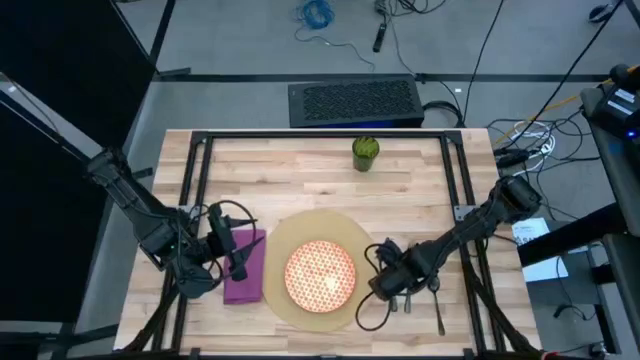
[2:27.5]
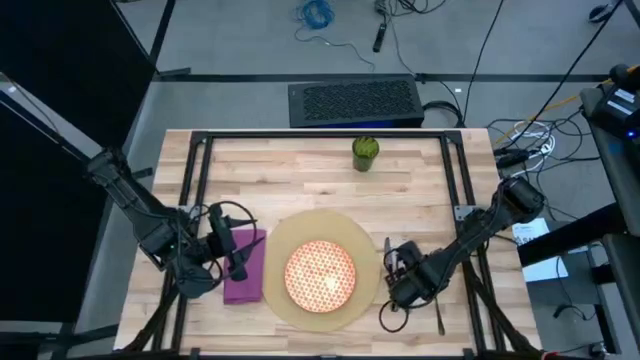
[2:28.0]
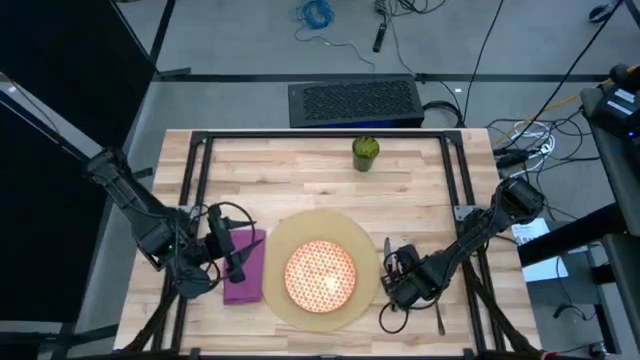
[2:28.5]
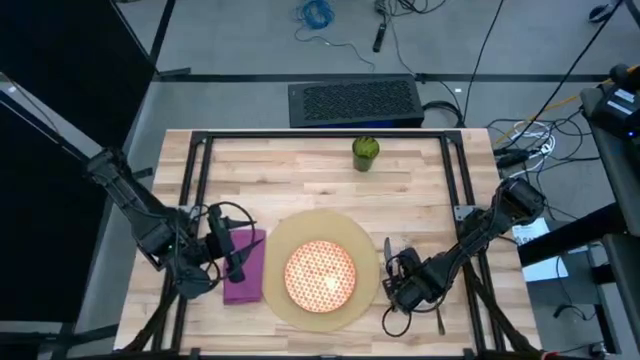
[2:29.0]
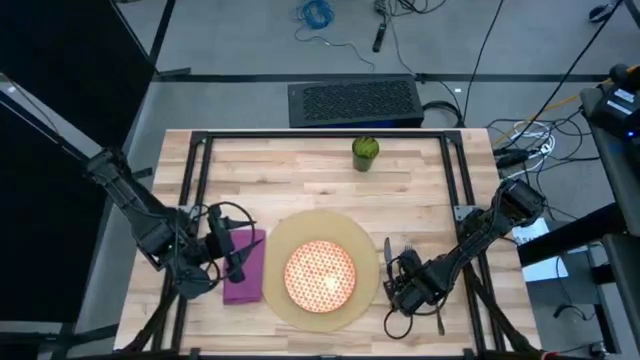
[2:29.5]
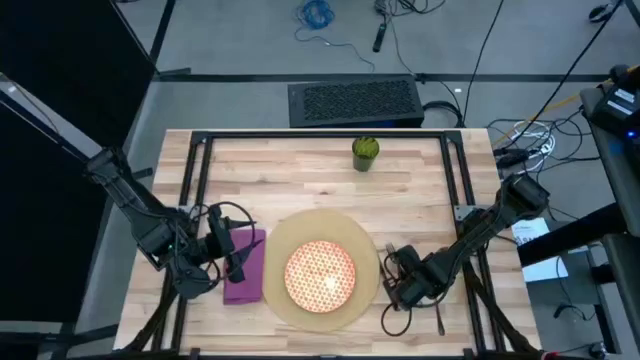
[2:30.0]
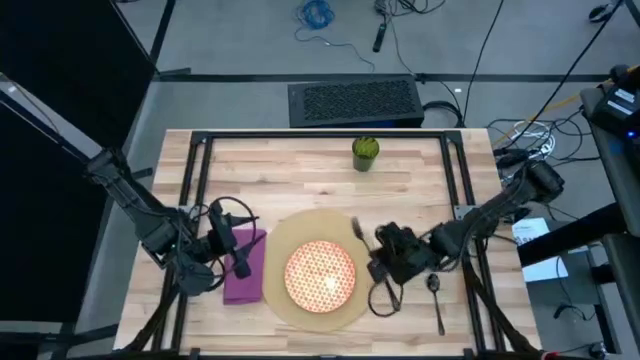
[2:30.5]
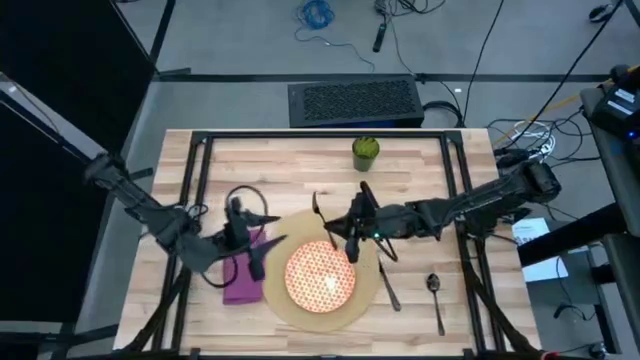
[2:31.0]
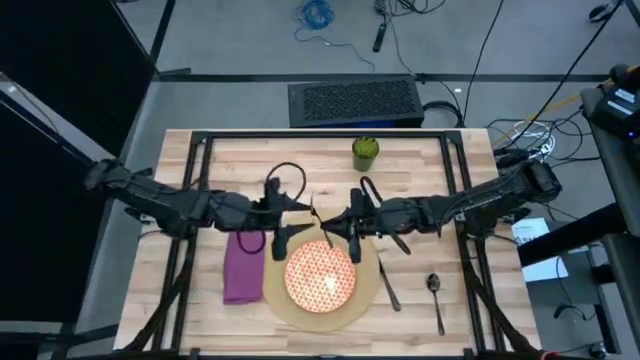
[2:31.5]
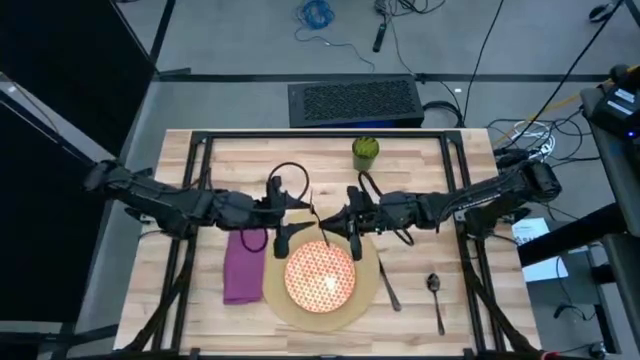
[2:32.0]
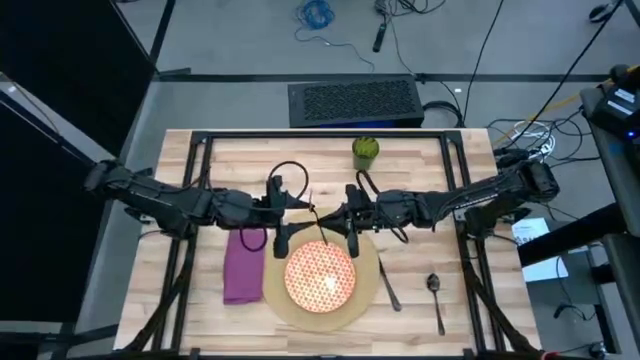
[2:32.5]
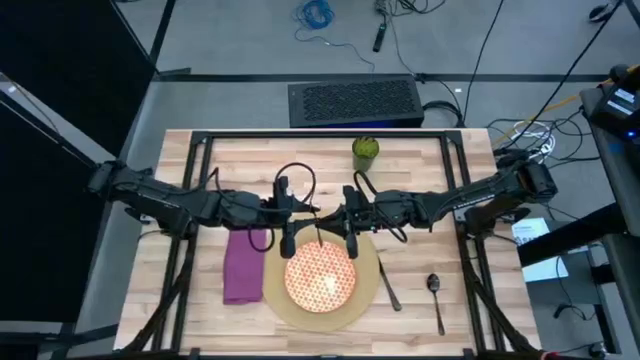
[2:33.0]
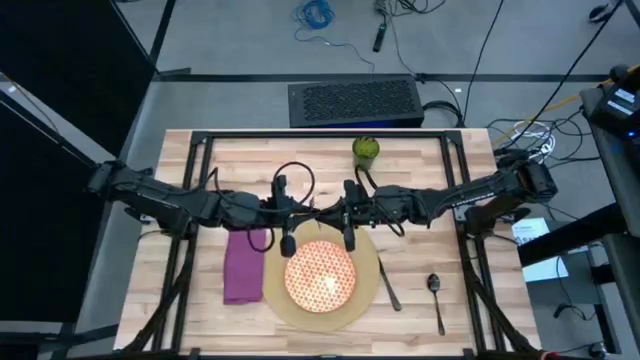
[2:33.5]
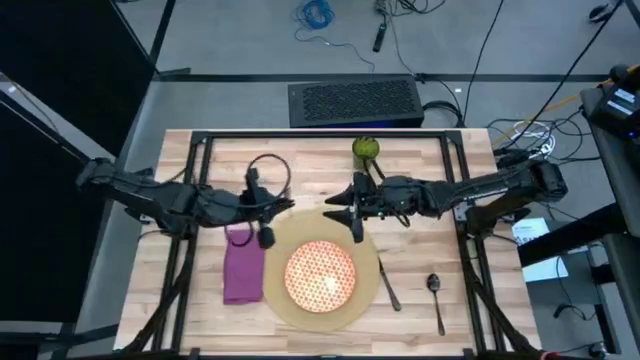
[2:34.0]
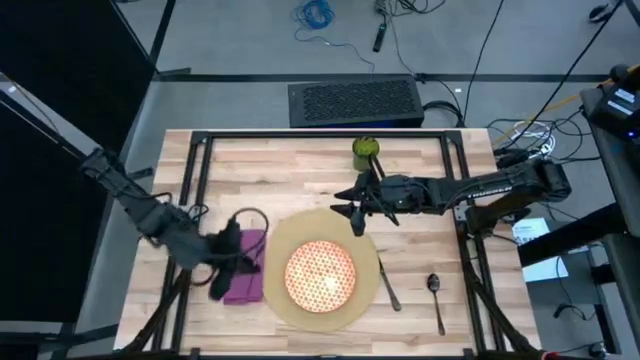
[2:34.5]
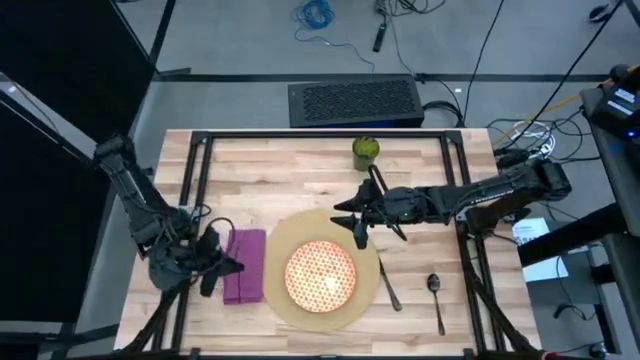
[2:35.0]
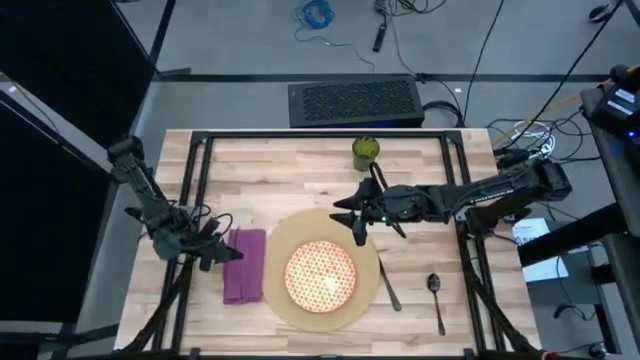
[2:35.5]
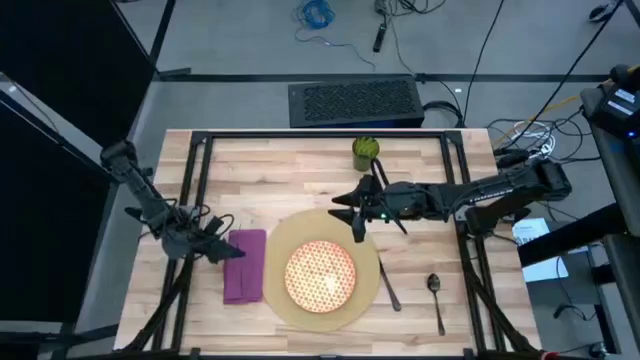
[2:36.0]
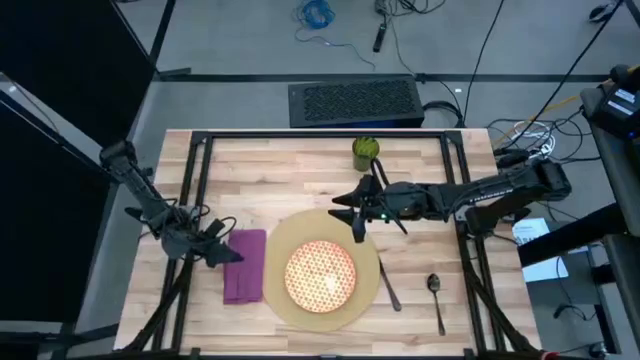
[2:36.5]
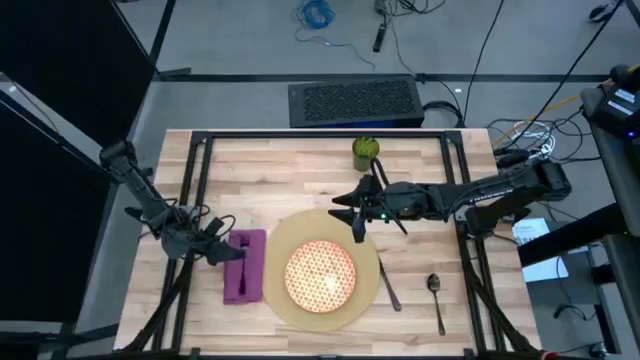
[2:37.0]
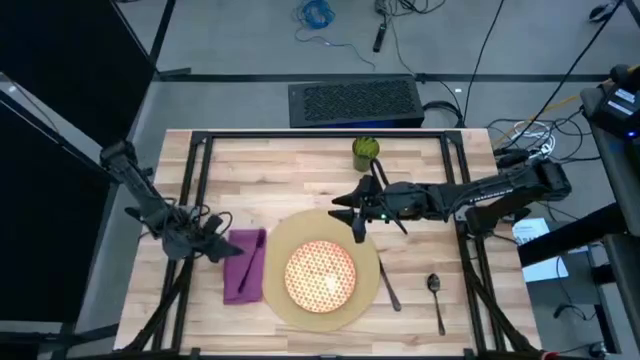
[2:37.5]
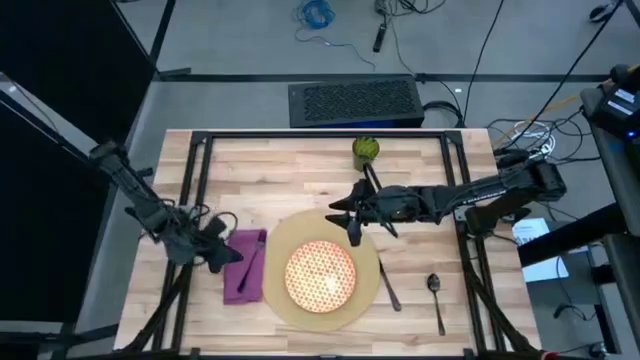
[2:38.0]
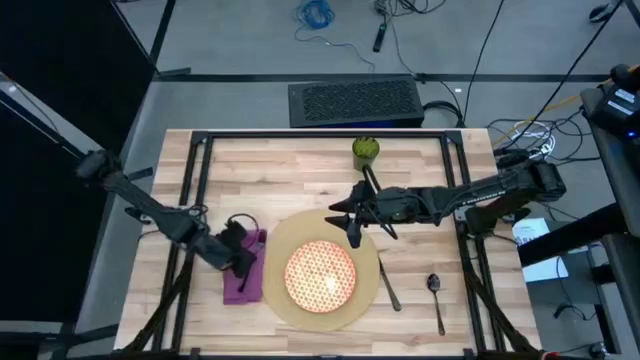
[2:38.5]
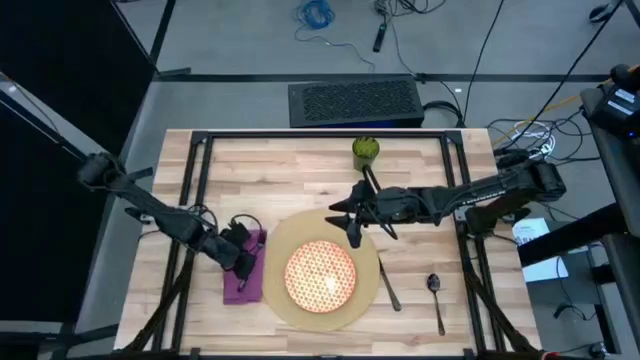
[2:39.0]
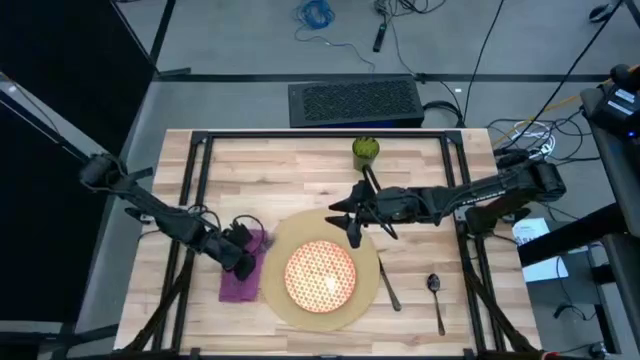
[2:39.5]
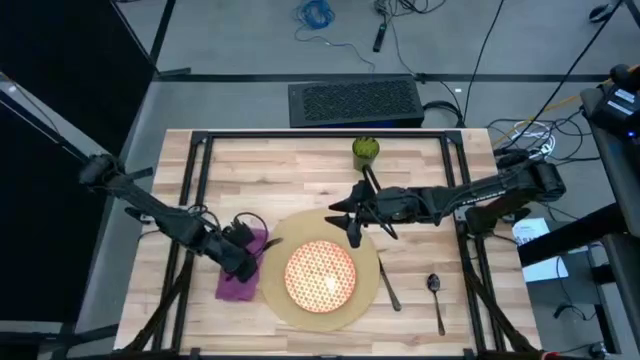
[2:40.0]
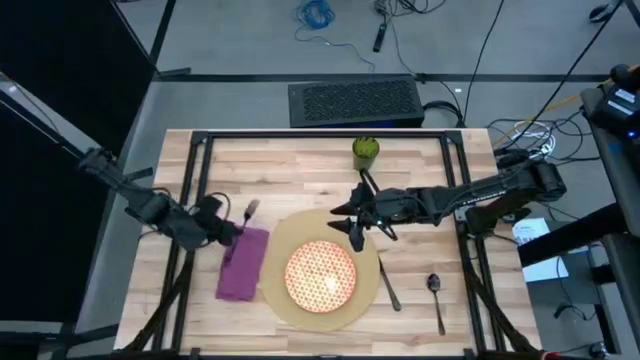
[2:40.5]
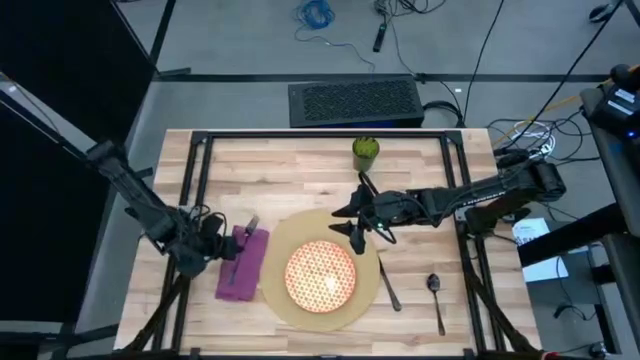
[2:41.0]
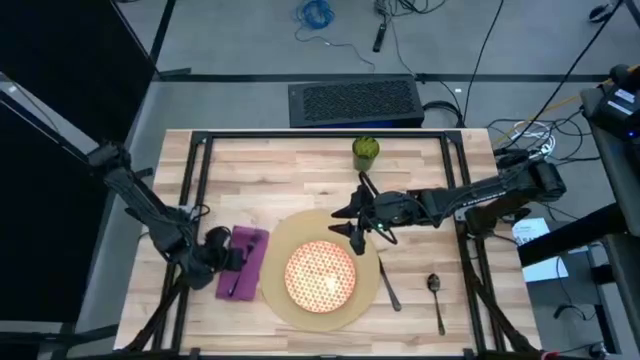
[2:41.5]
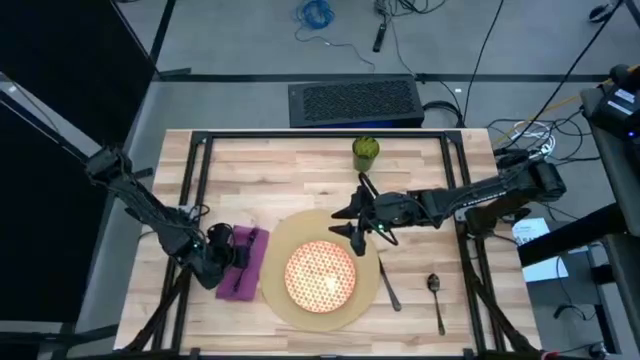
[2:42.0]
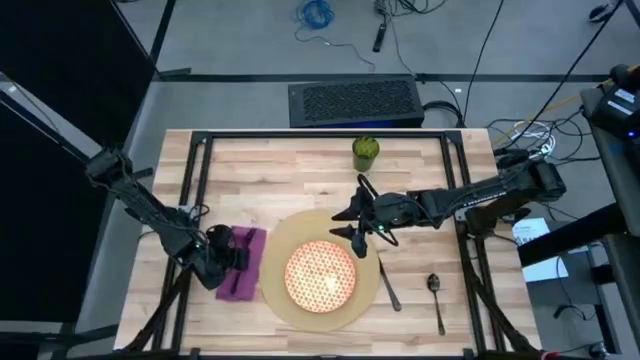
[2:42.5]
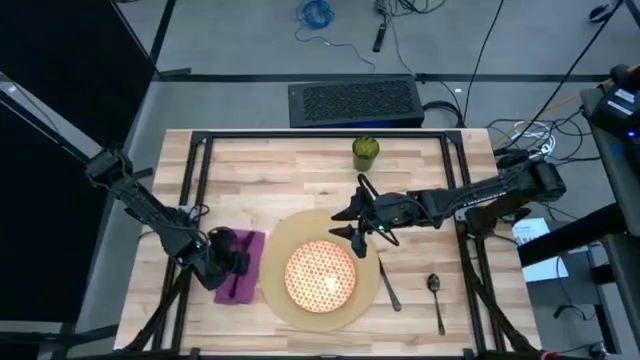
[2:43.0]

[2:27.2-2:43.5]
Task: Set table place
Put the black fork on top of the purple table napkin

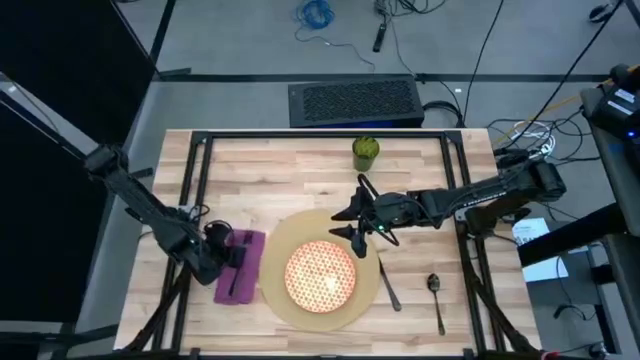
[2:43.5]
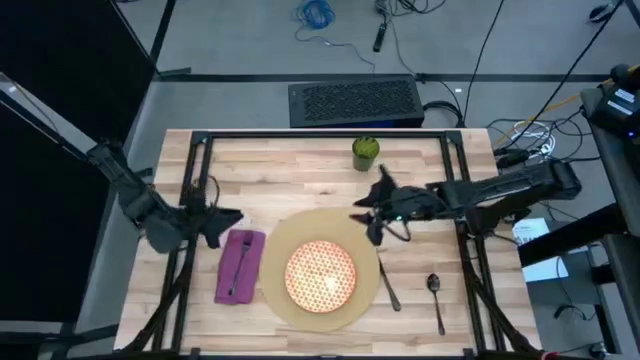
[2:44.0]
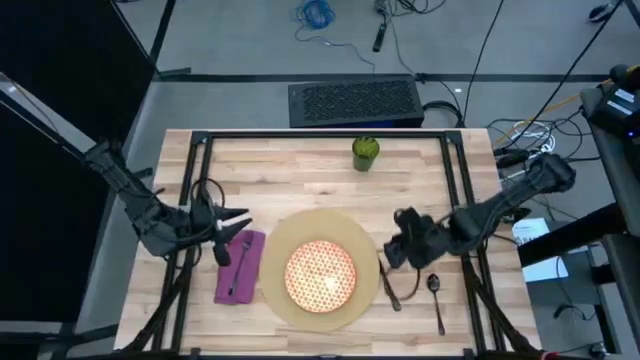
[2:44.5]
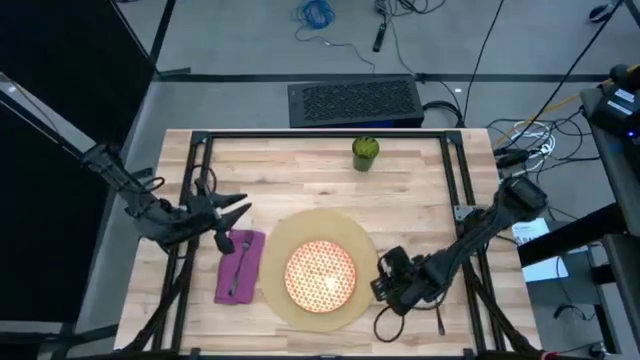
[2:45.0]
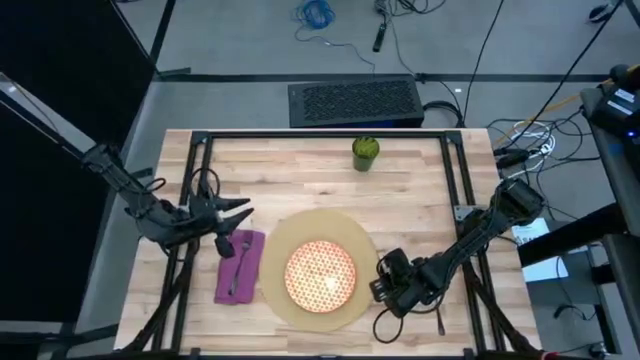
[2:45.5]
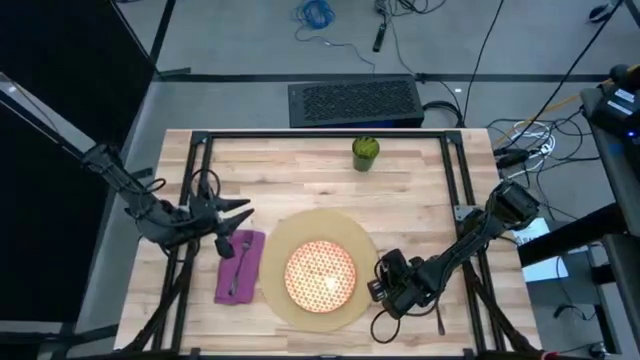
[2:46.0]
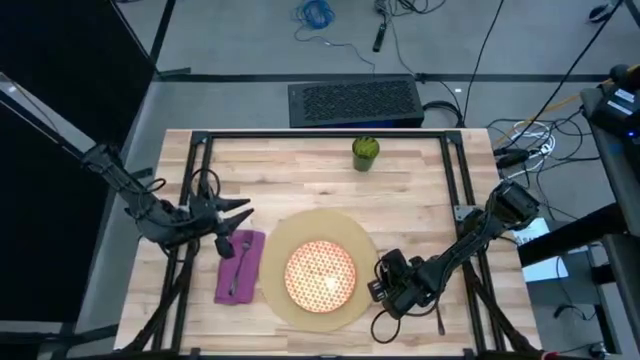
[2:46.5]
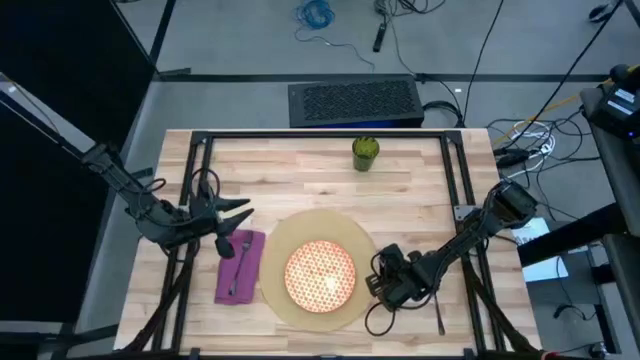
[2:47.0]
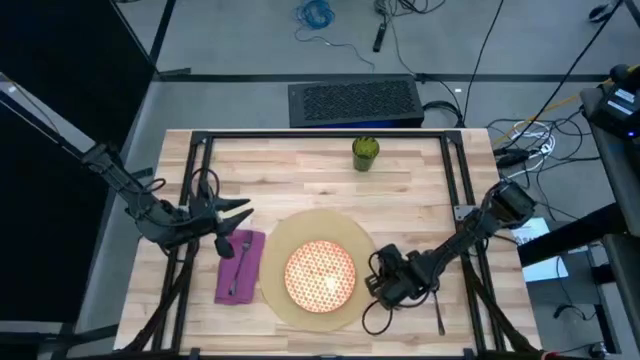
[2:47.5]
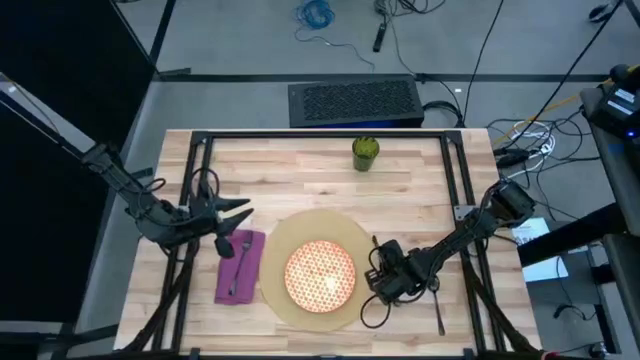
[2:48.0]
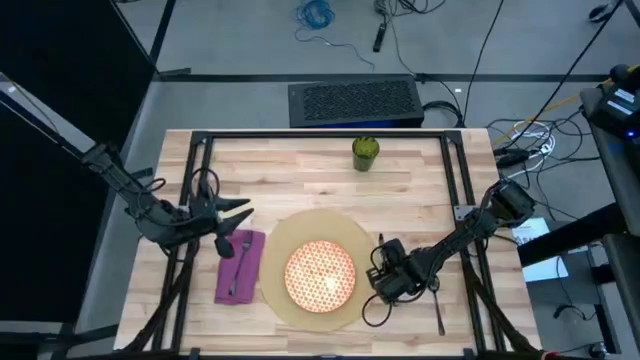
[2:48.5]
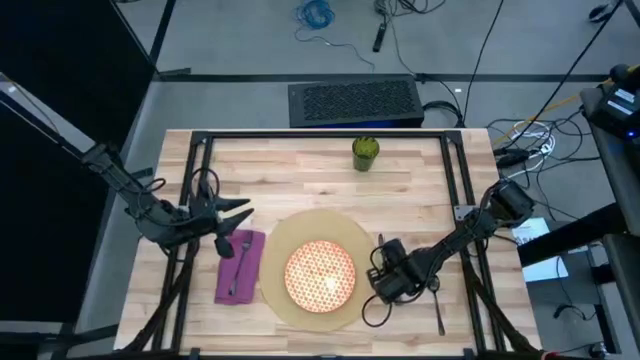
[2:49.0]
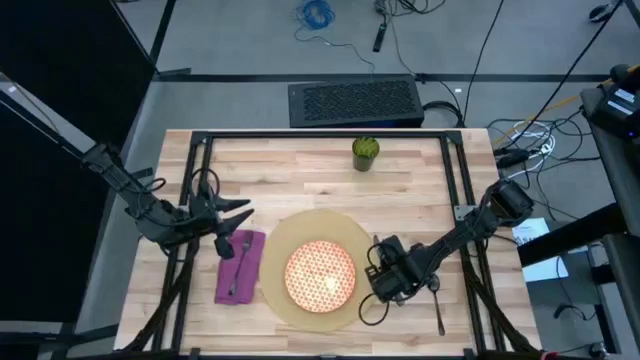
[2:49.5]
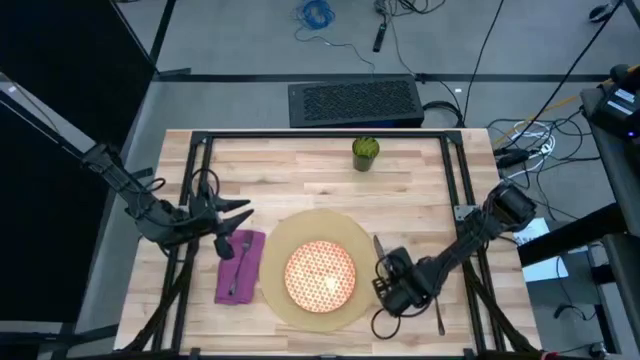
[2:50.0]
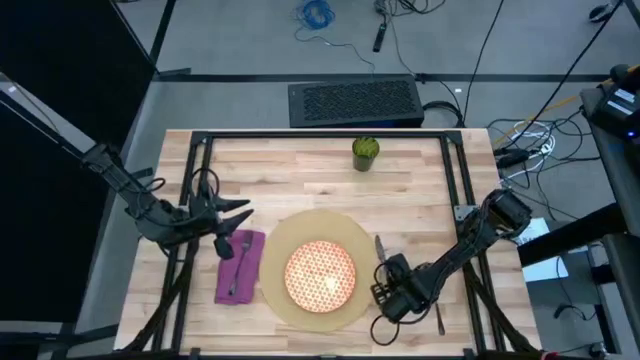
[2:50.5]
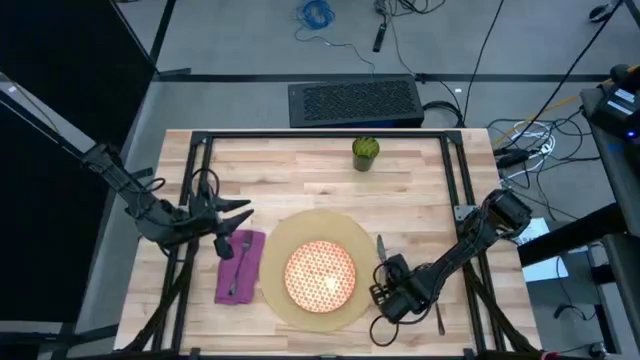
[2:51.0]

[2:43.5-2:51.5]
Adjust the black table knife
